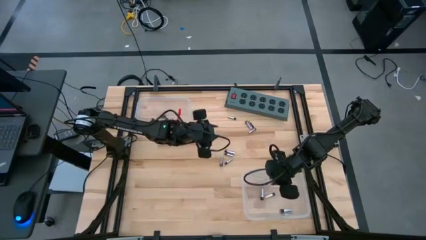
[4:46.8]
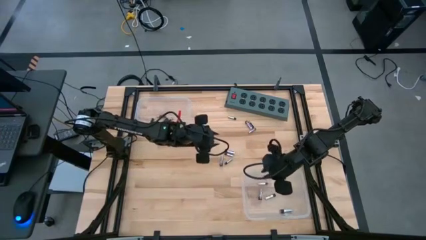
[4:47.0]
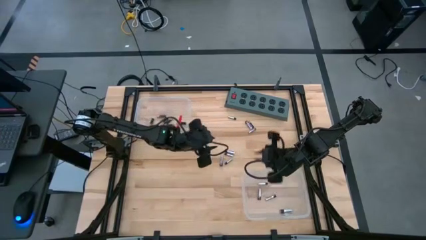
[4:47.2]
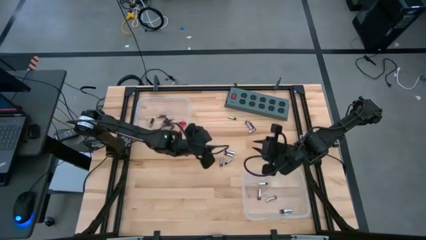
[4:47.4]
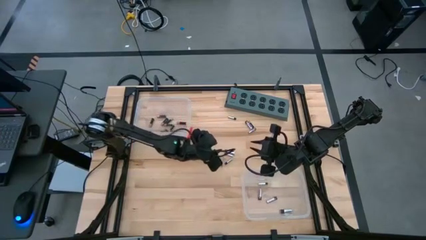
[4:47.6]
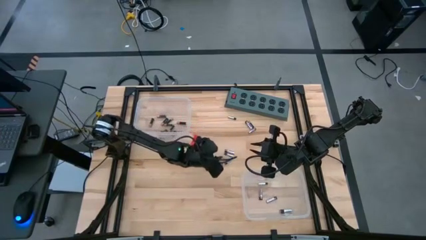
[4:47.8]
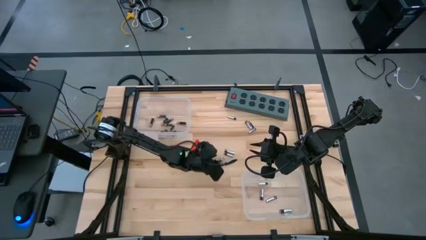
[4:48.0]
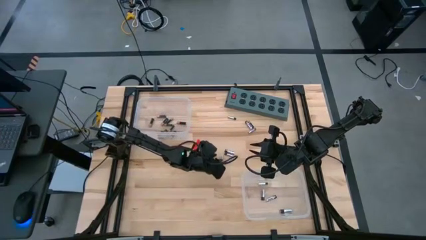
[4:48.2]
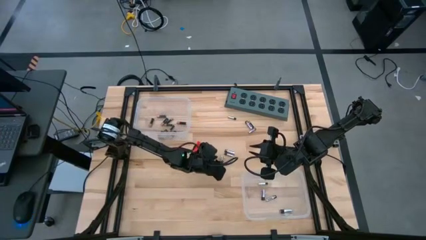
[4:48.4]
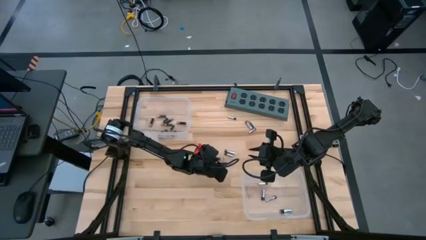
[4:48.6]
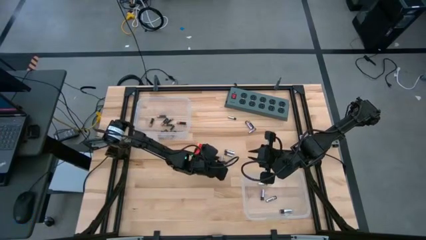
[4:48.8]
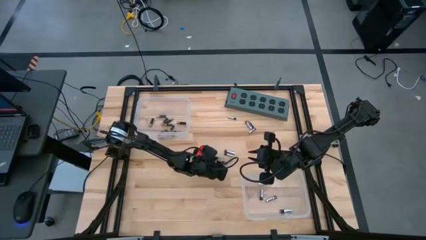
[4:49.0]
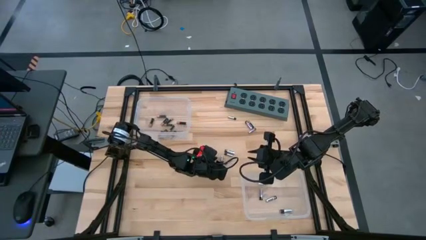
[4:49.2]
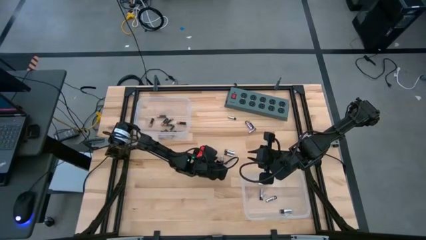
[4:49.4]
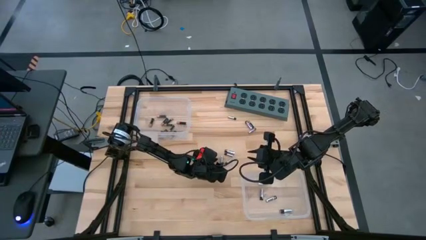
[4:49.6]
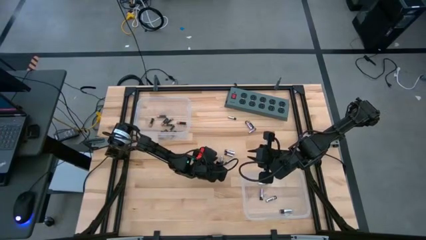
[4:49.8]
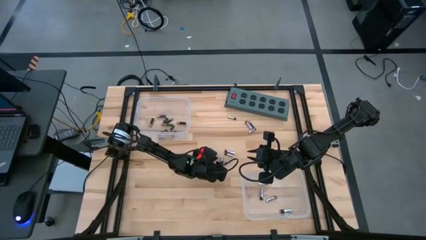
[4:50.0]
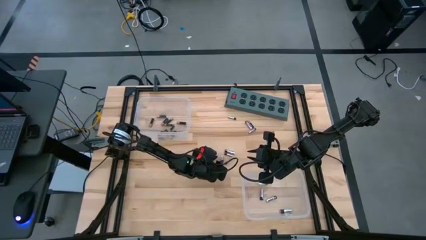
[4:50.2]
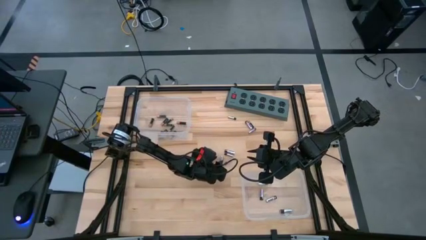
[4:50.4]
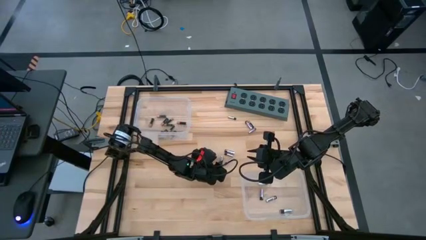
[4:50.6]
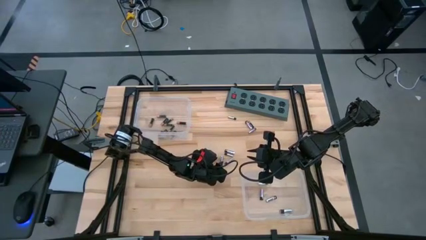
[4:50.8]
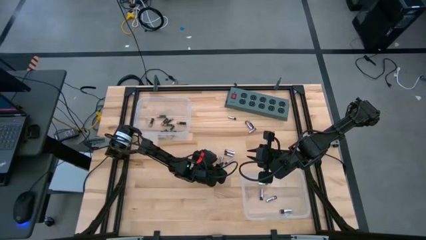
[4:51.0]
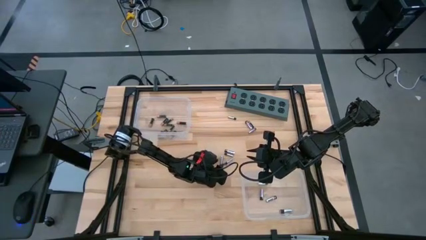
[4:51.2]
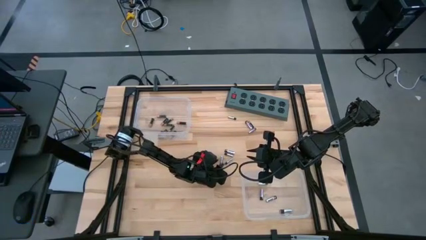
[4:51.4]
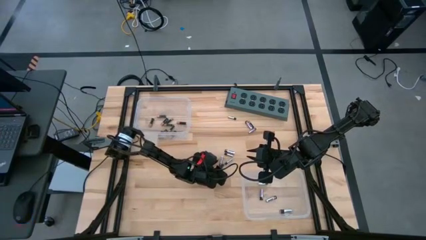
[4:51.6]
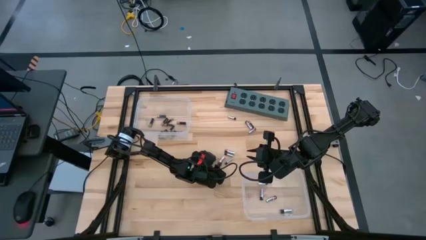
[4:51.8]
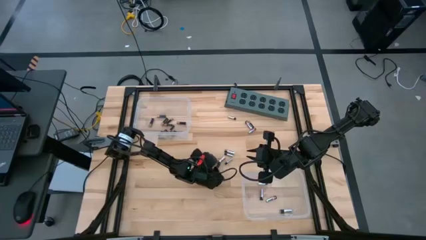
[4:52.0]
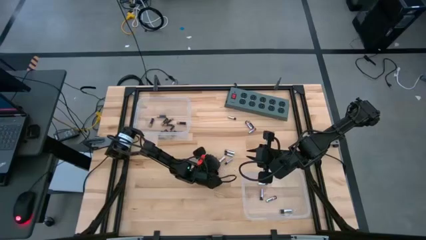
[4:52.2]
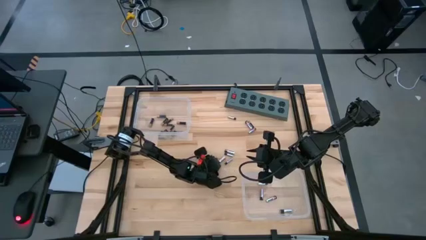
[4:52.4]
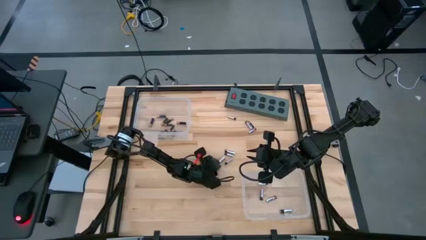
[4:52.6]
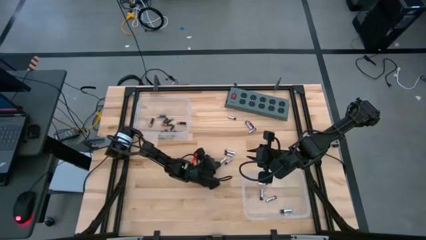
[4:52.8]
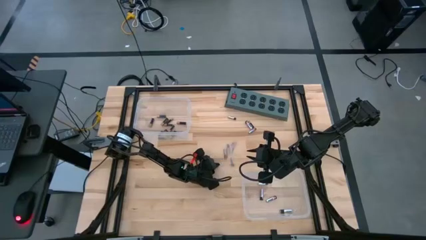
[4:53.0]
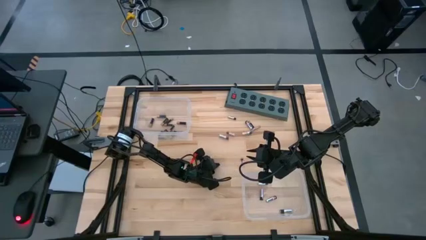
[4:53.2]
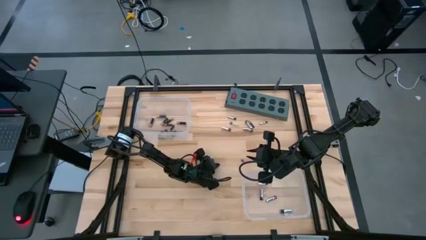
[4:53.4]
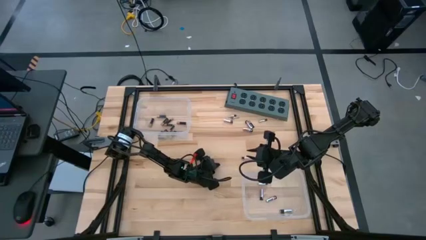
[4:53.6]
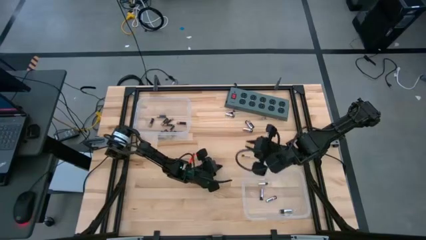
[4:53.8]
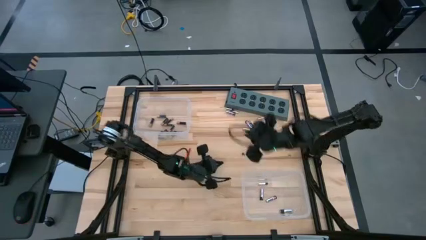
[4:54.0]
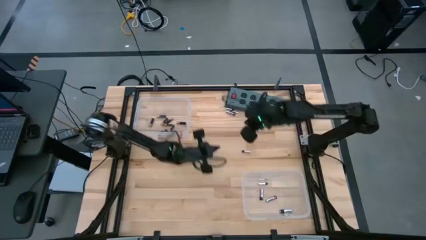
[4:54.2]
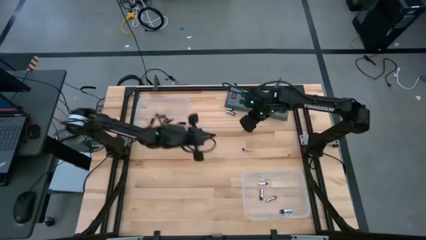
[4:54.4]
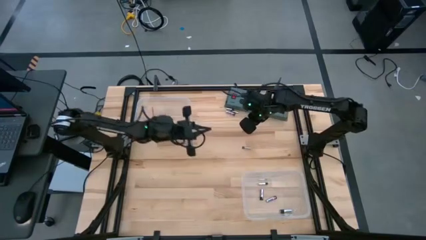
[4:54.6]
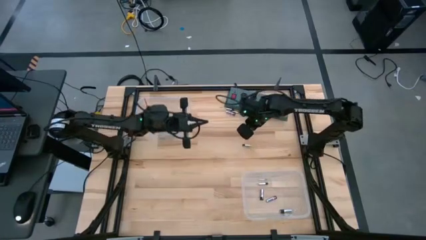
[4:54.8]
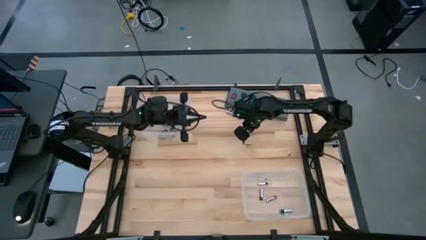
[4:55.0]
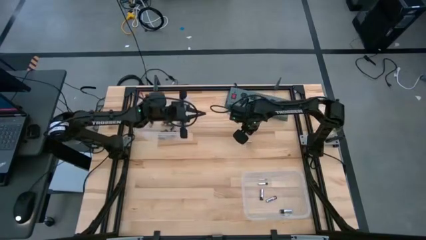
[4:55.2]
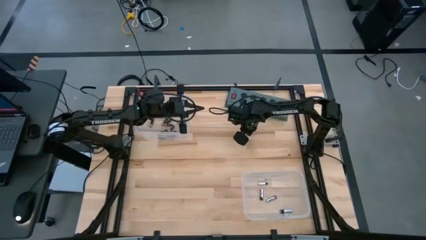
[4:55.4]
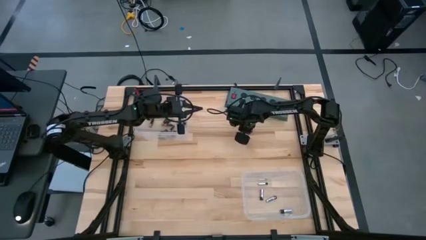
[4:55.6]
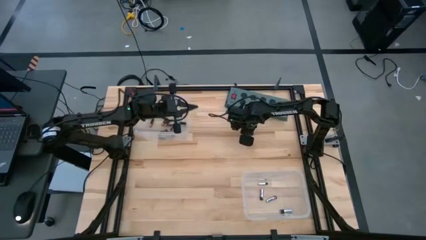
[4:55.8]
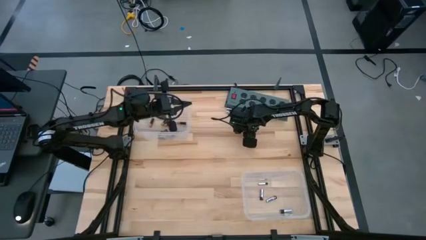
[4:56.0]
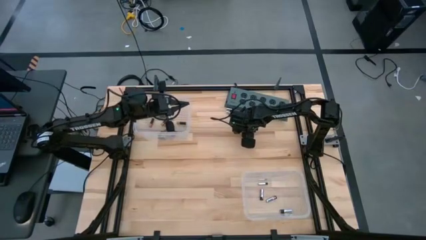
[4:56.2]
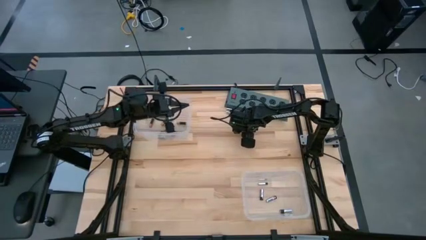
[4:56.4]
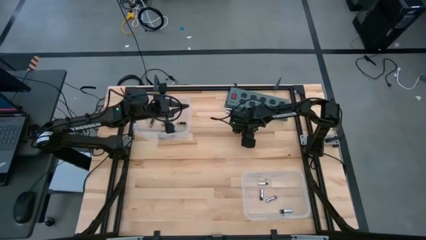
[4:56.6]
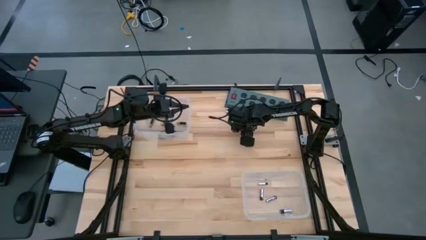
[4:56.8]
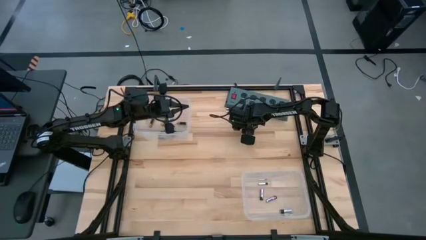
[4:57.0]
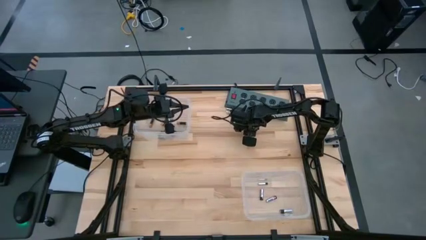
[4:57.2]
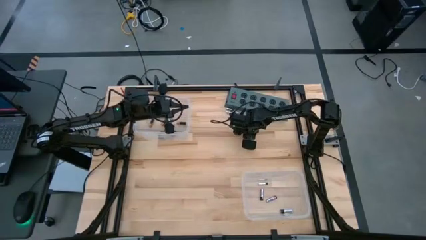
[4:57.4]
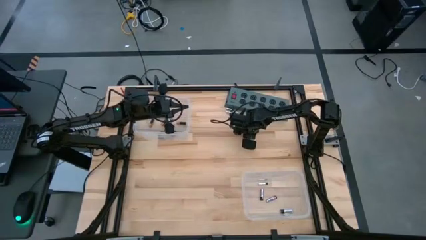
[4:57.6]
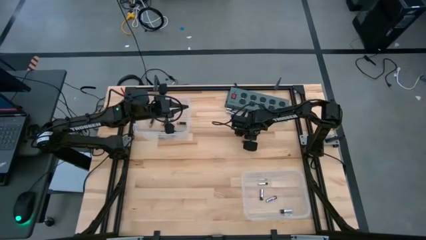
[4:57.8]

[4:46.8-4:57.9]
Task: Sort batteries
Put the silver battery into the bottom transparent bin

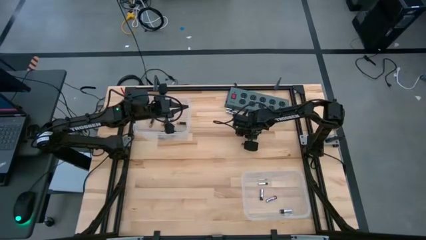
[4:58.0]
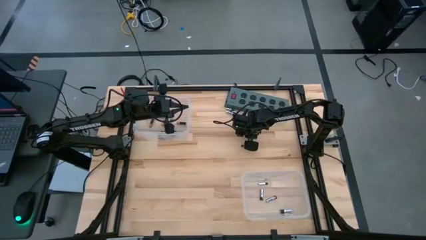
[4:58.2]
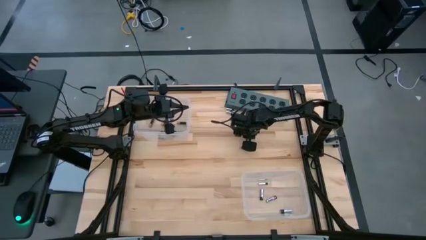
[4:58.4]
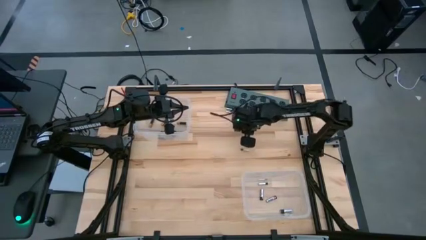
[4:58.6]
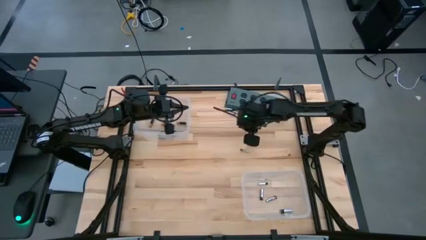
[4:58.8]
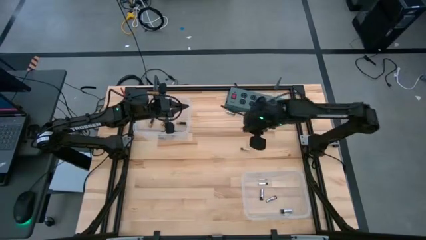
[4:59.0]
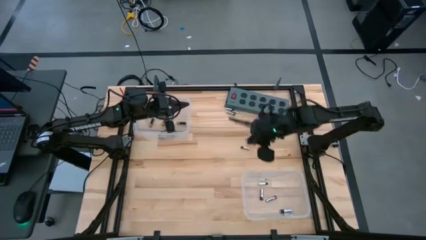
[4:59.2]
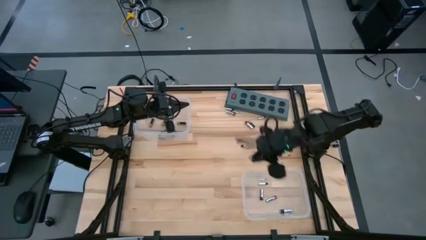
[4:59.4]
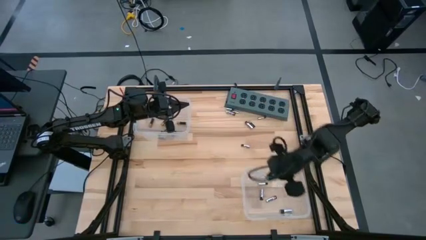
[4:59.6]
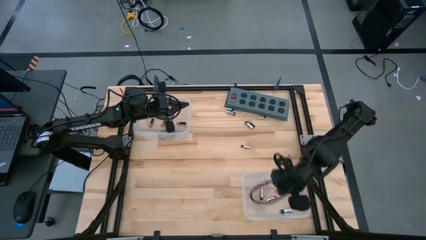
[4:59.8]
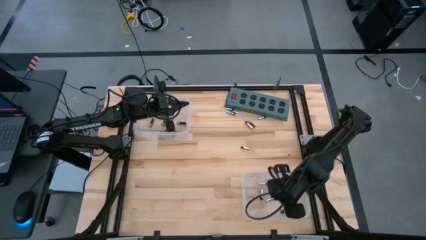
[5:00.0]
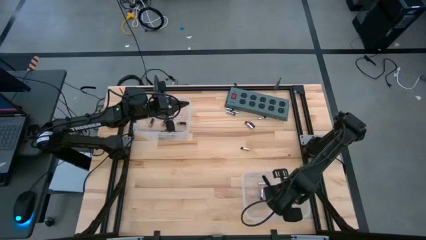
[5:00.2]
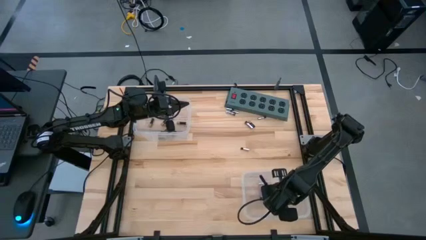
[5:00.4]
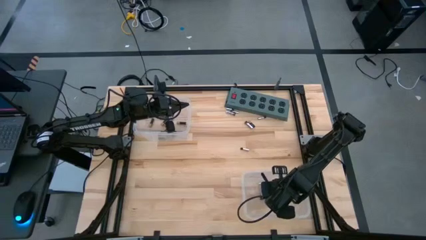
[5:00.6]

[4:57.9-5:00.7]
Put the silver battery into the bottom transparent bin

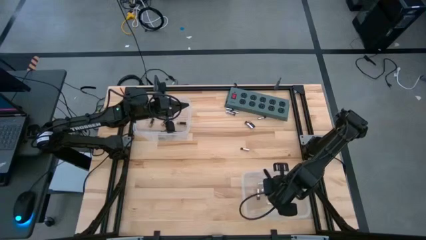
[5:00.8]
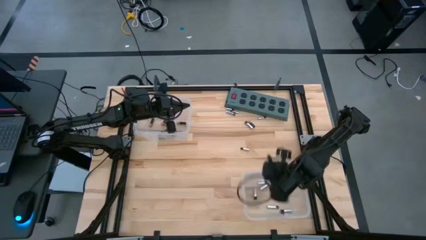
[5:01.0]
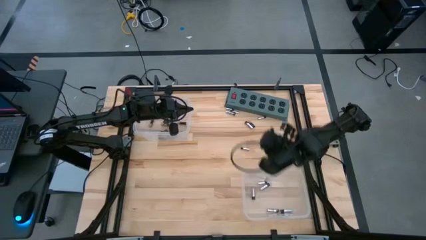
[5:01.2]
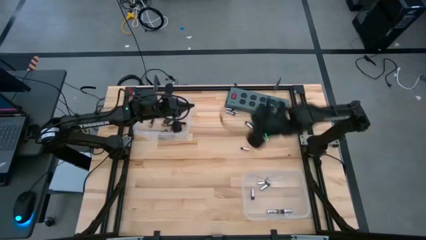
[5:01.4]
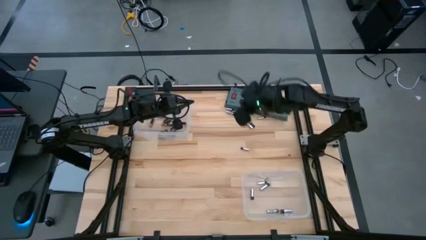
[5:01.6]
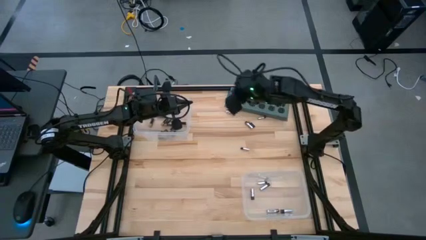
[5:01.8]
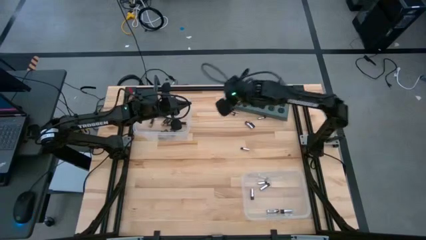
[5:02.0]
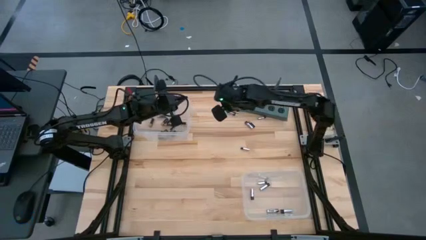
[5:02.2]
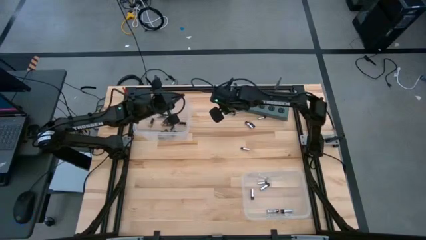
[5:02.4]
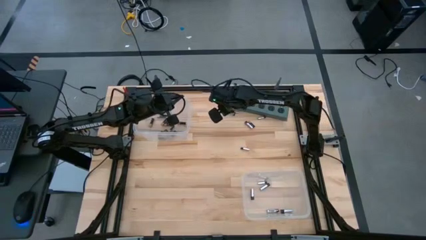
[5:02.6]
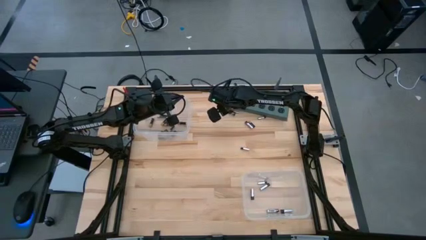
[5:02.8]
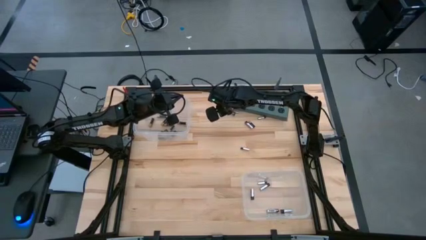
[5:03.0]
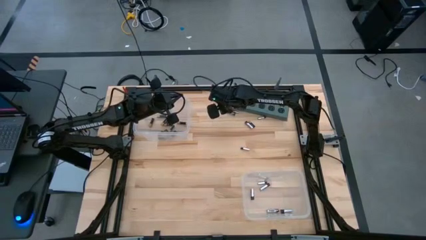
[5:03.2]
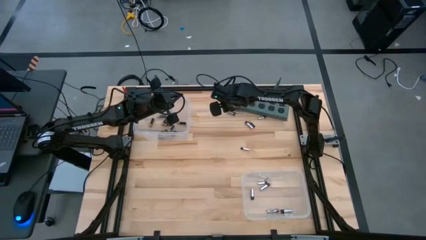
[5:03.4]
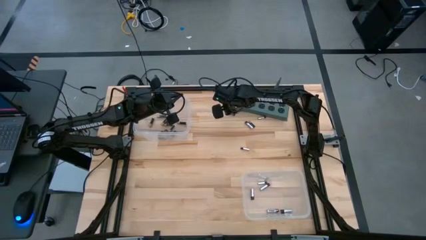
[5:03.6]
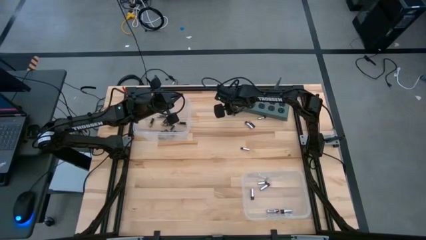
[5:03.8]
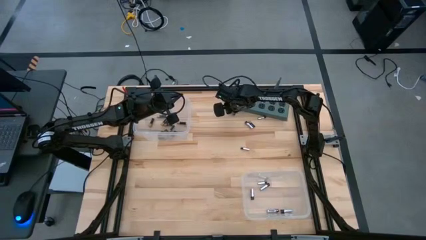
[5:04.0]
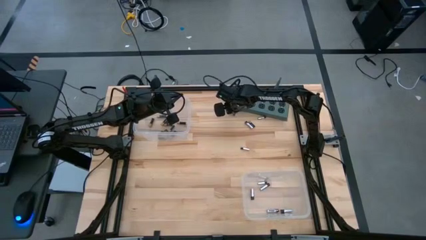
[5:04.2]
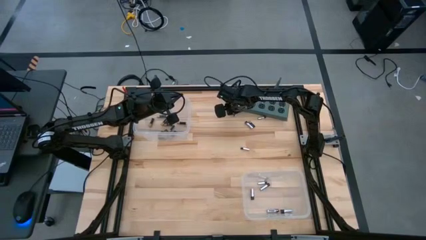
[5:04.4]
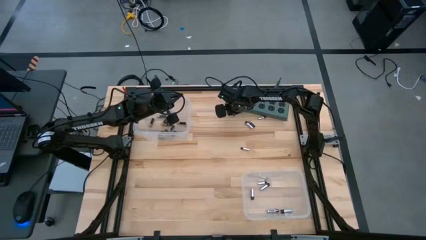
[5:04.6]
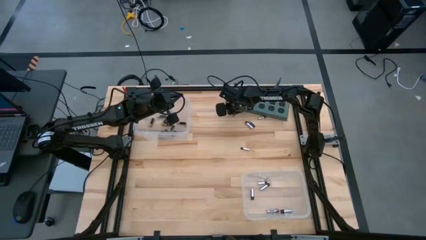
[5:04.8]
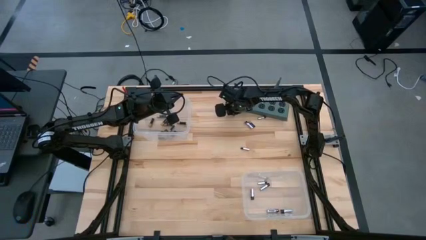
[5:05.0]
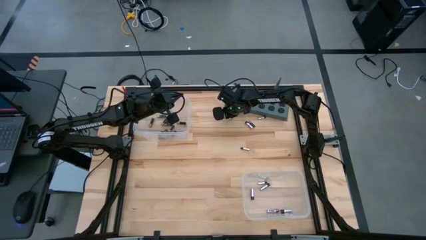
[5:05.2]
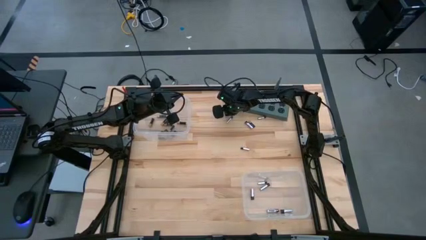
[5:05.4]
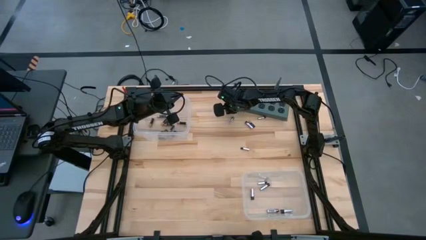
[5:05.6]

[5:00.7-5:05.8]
Put the silver battery into the bottom transparent bin
